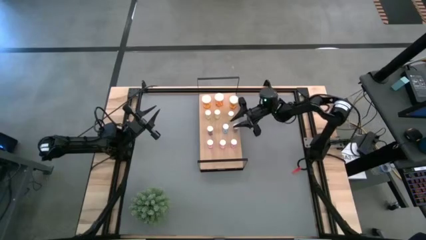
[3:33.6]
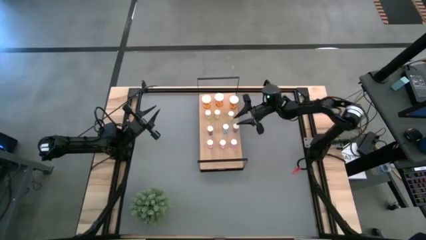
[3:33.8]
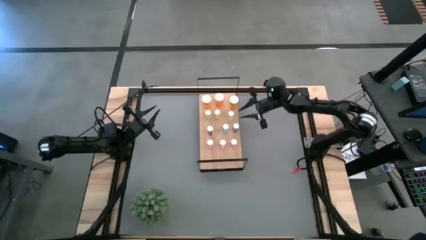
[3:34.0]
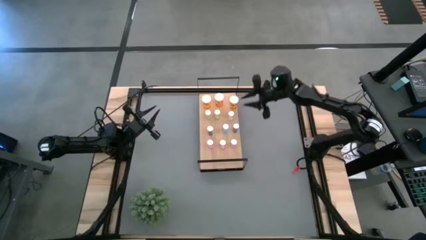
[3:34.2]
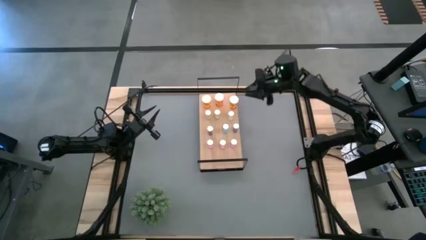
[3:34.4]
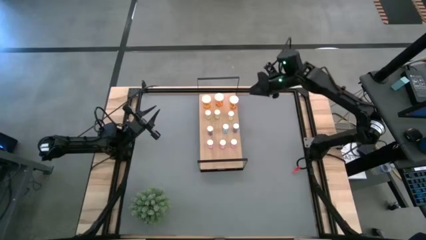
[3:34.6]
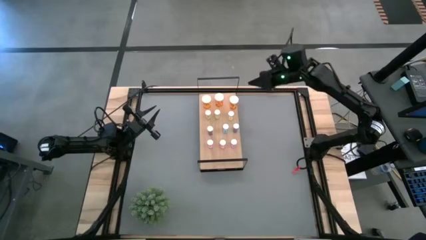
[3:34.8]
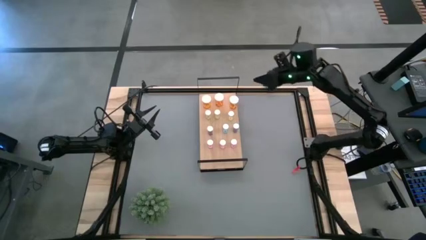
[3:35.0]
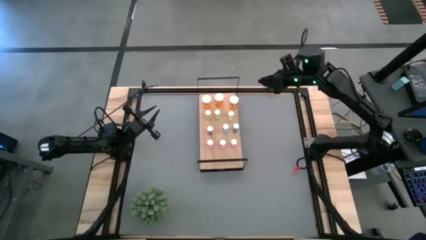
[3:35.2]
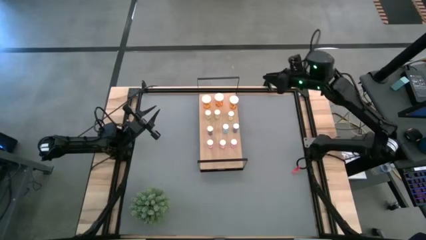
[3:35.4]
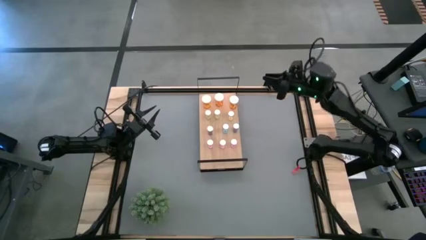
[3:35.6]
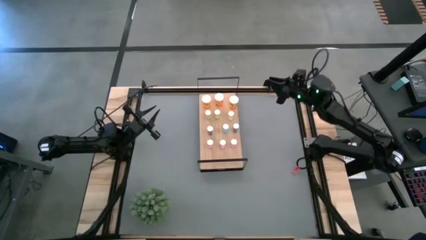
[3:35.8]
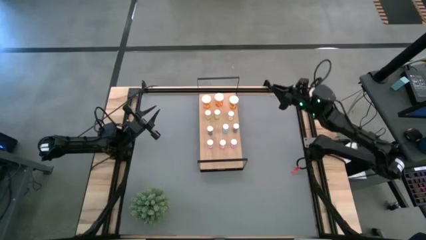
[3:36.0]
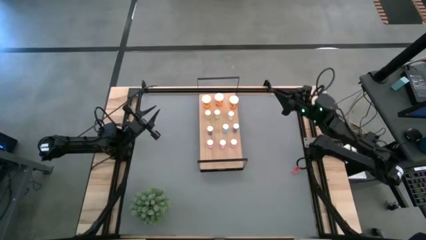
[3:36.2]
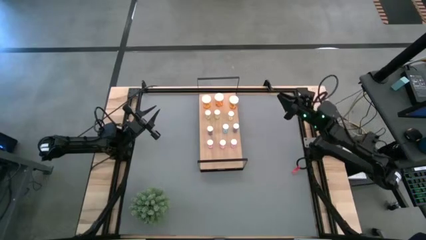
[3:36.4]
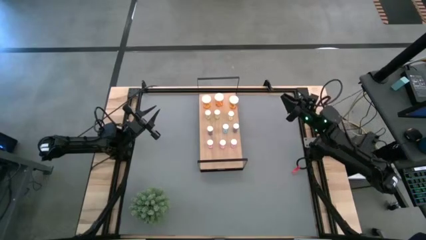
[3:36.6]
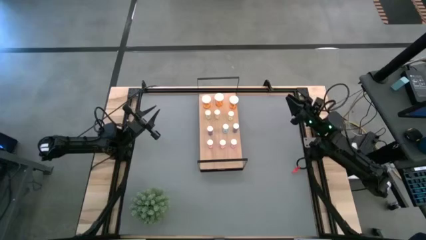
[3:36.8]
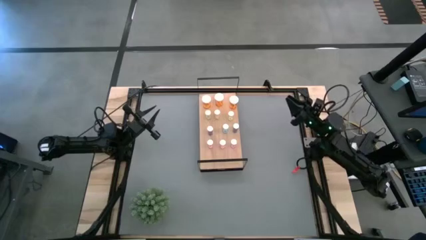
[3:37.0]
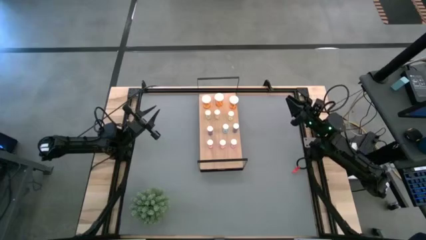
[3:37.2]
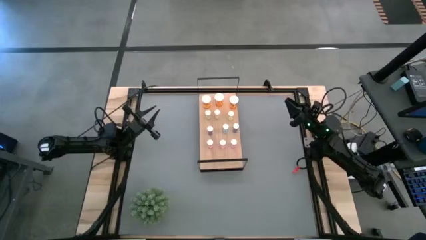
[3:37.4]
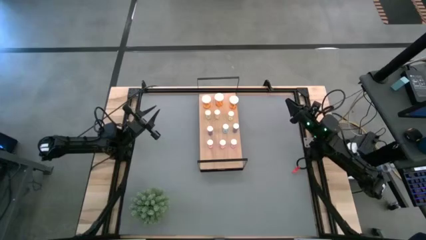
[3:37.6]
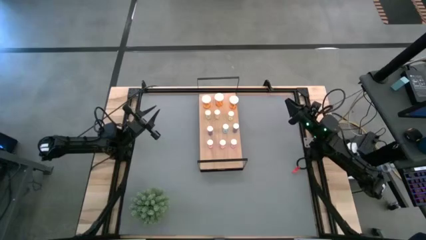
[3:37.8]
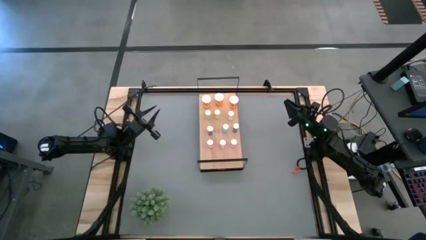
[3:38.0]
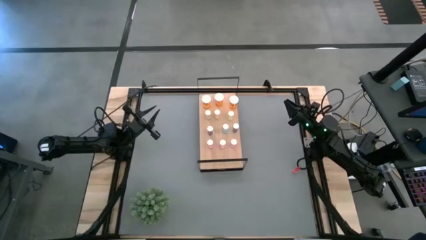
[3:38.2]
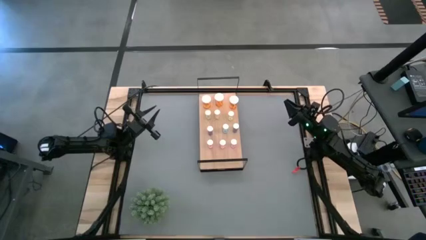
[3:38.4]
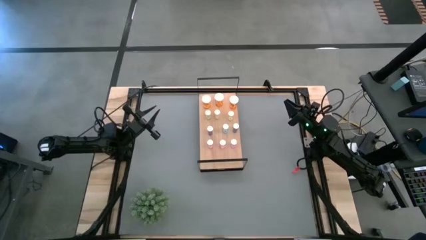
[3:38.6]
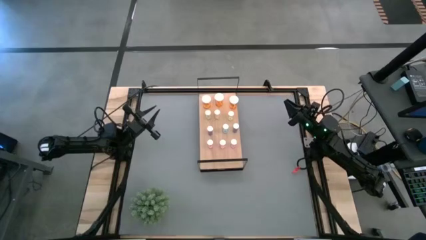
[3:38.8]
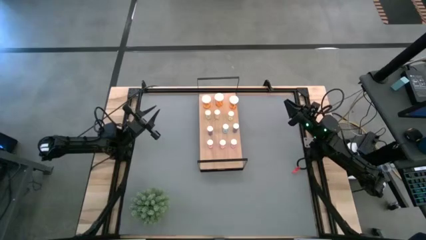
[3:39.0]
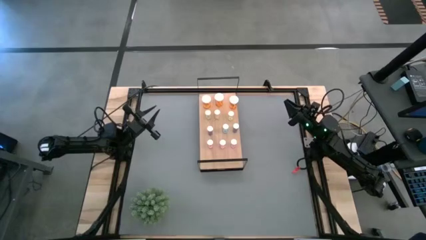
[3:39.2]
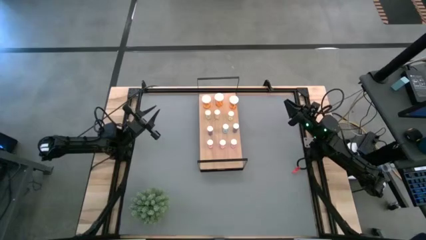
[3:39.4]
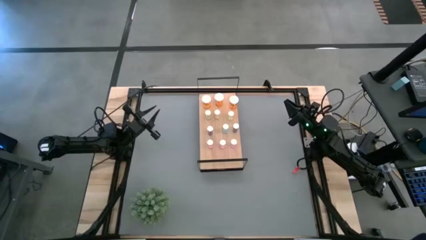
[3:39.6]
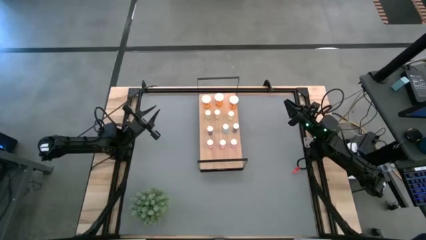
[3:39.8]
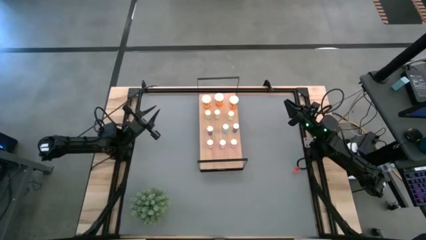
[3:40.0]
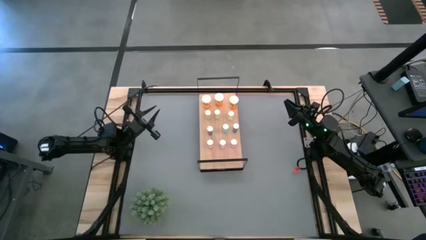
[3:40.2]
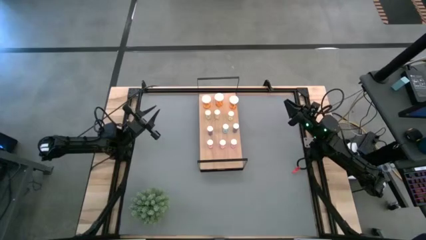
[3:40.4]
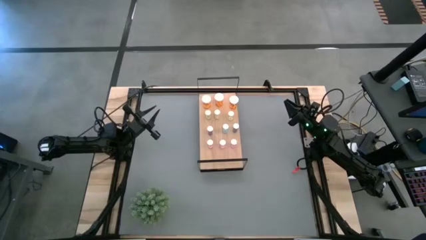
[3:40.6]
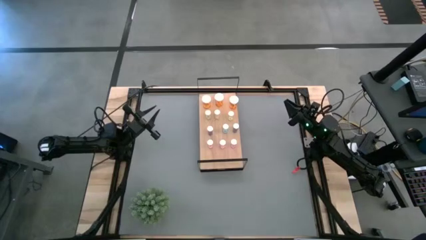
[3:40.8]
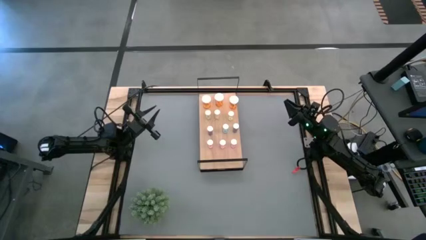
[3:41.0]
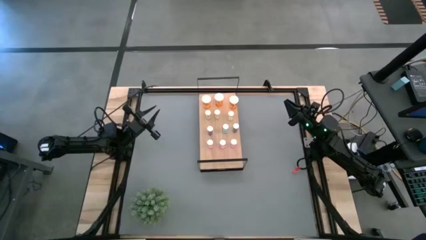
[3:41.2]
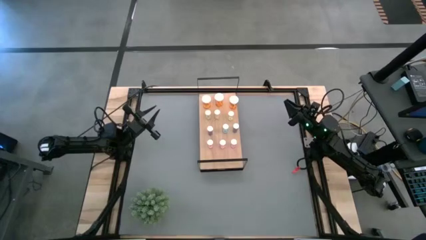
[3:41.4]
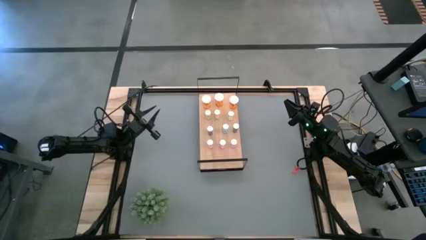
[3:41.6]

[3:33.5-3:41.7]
Task: Pick and place medicine bottles onto shelf by color
Return to Home Position

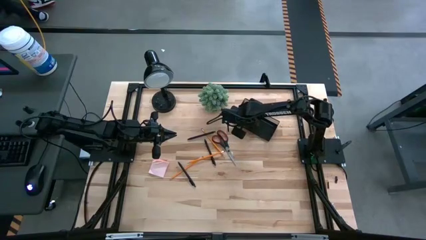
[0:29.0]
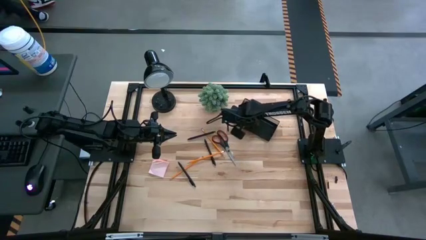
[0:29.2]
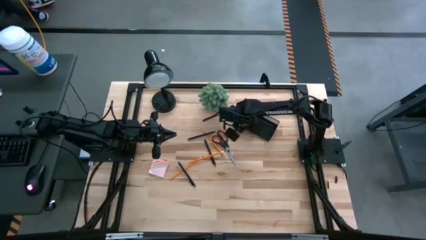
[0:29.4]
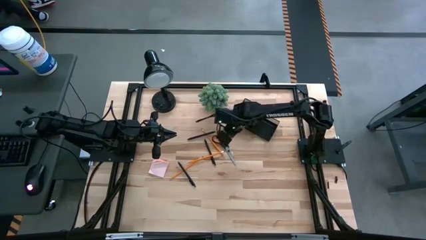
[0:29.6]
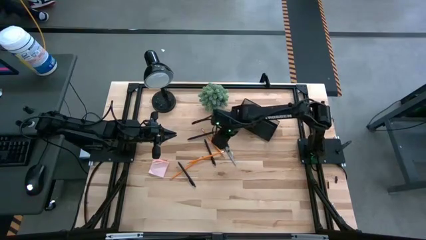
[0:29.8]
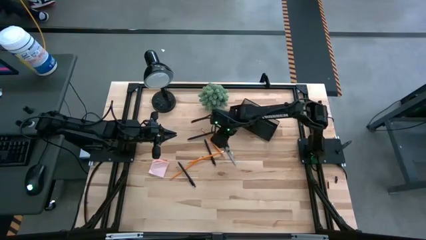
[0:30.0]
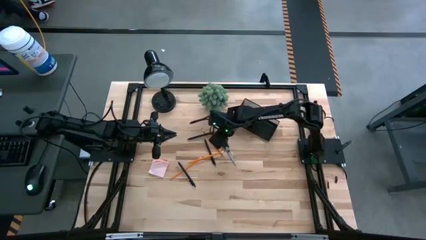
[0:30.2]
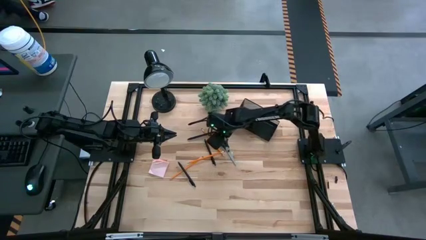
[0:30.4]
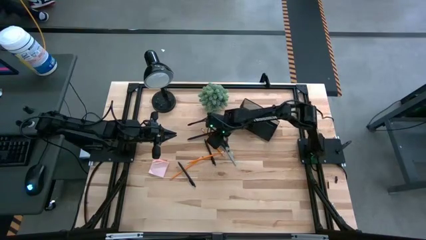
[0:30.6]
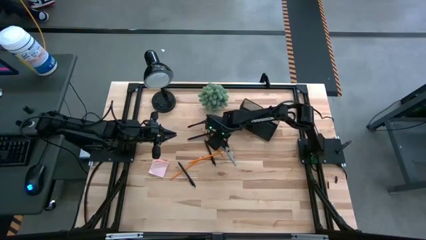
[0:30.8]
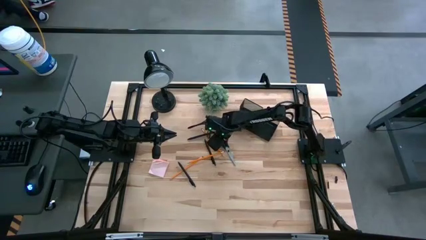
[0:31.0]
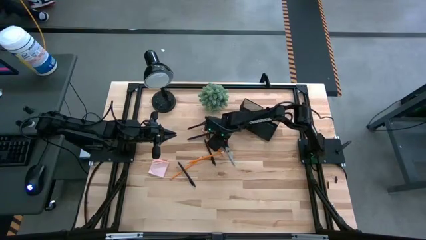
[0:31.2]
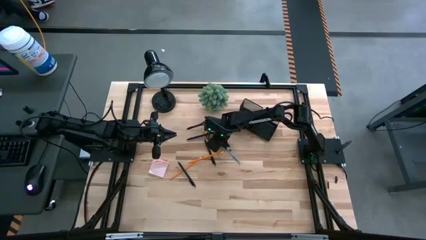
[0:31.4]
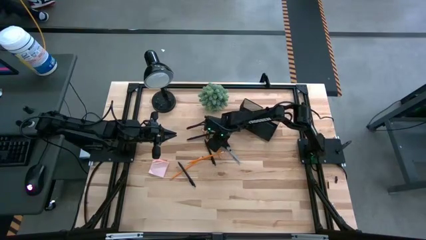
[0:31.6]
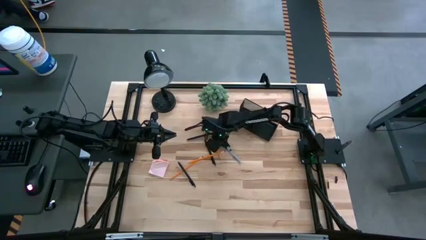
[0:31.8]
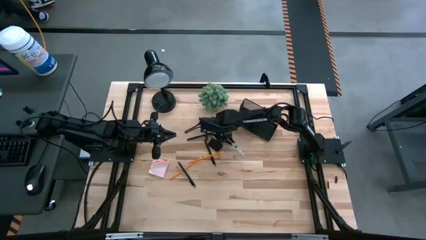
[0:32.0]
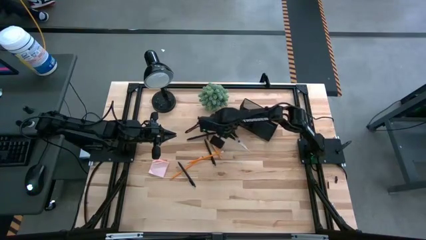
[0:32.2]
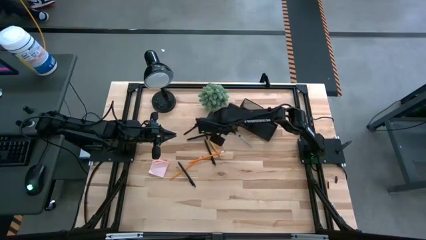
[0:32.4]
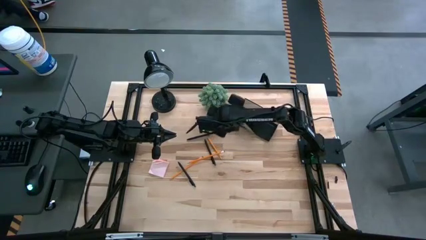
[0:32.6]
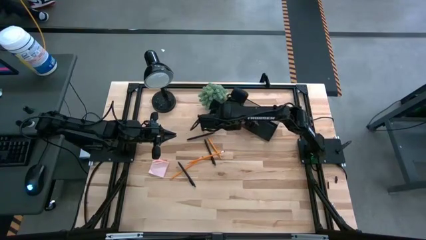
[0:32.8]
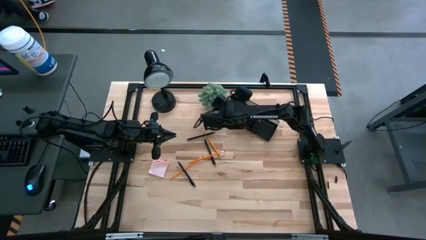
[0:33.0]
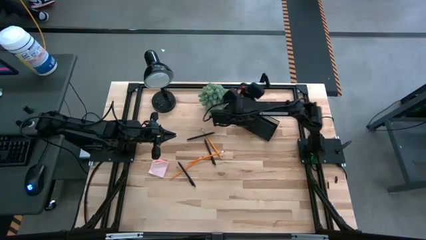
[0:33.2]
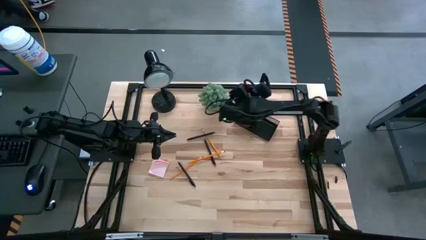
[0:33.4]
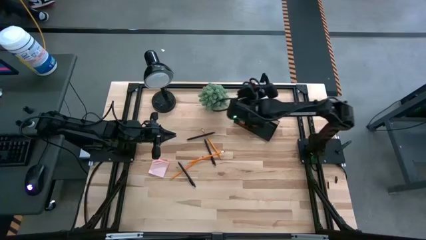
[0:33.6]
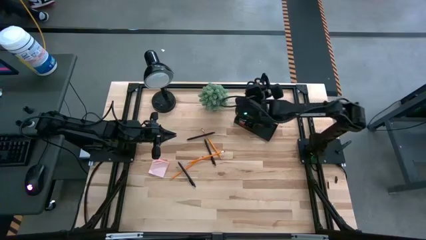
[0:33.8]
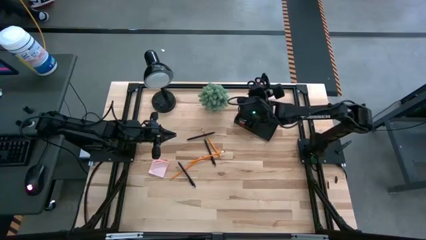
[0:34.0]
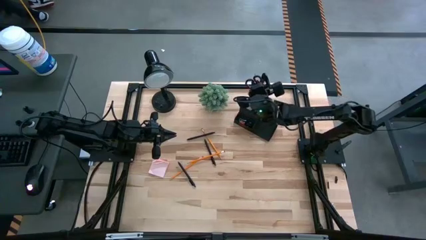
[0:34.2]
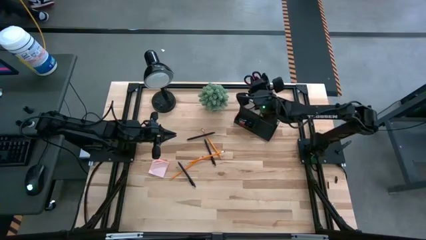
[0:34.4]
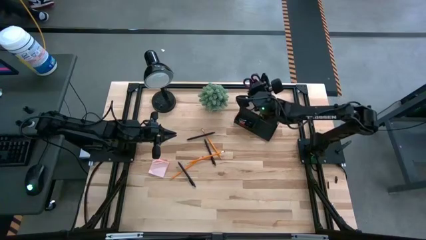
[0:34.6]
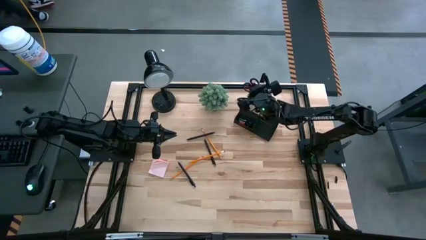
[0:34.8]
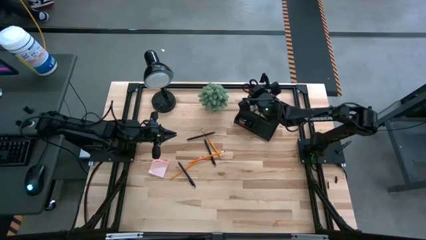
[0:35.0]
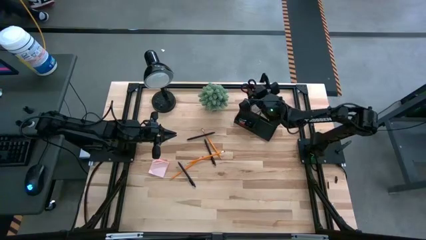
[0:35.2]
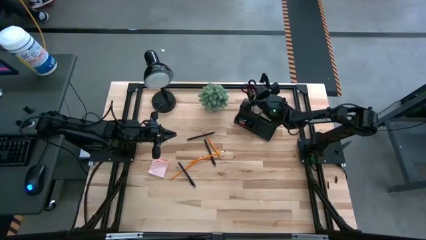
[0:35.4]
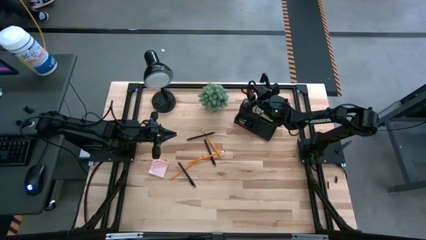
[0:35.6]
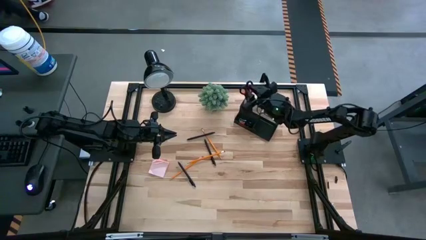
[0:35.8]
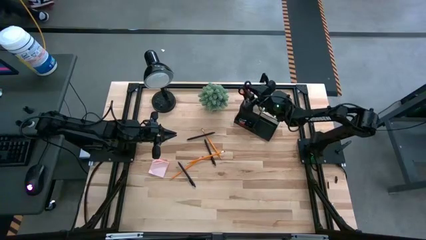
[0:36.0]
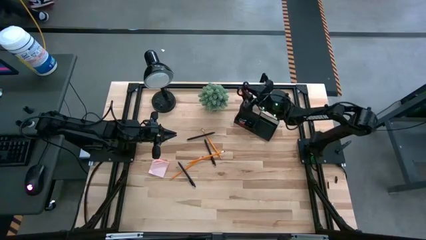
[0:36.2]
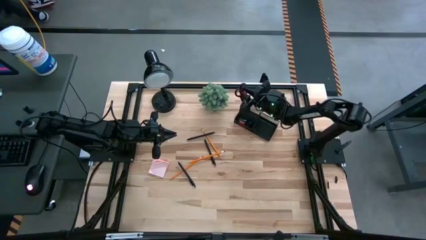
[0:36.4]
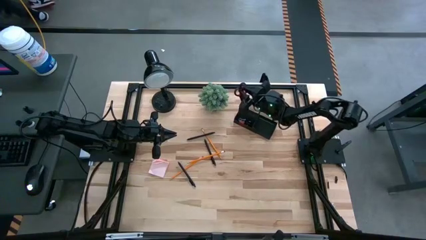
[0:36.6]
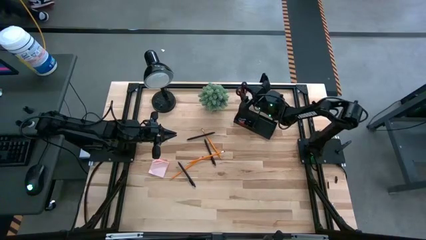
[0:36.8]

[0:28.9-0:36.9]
Task: Pick and place office supplies into organizer
Put the black scissors into the black desk organizer
